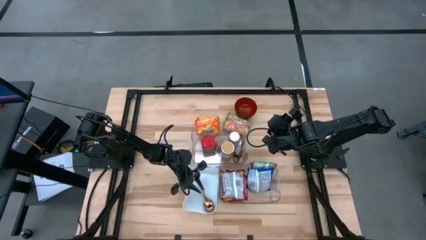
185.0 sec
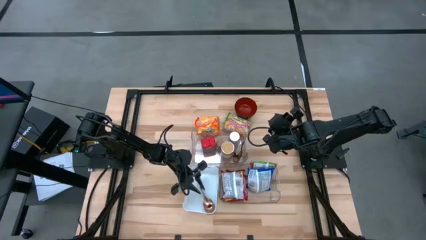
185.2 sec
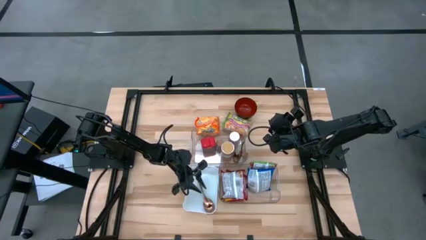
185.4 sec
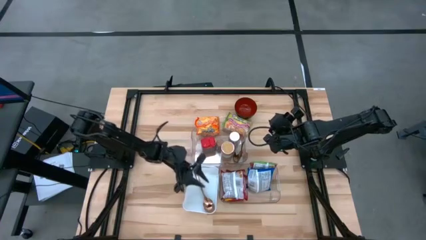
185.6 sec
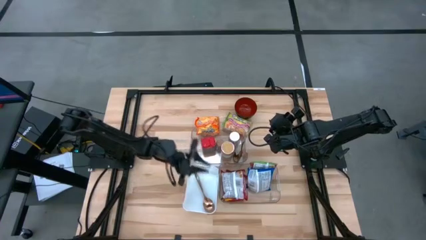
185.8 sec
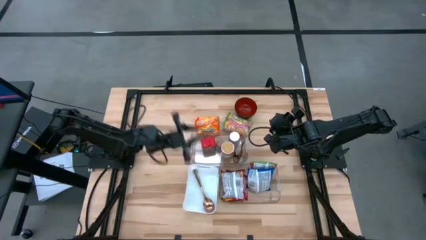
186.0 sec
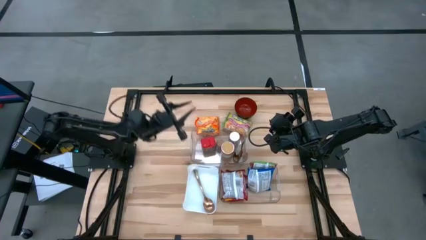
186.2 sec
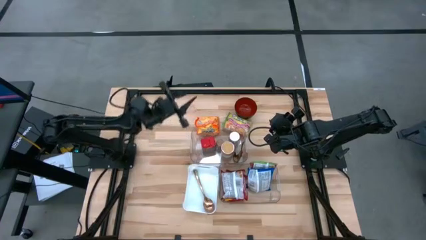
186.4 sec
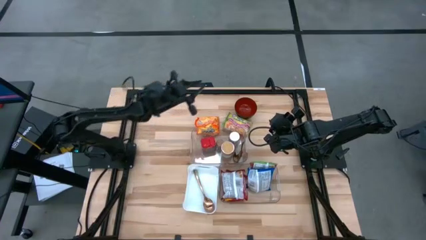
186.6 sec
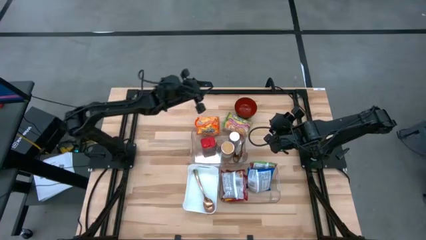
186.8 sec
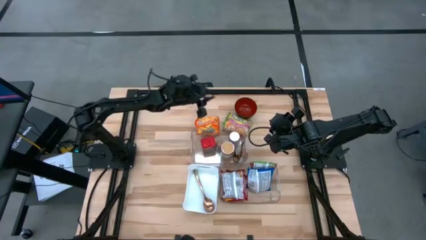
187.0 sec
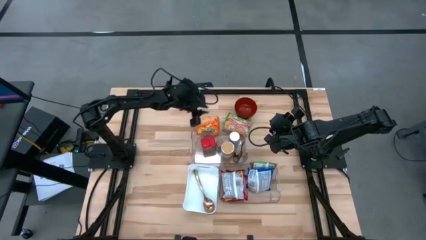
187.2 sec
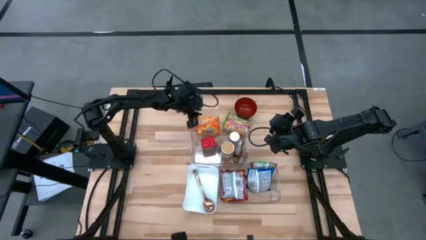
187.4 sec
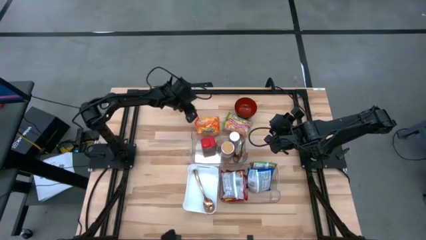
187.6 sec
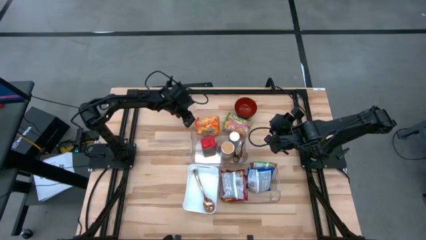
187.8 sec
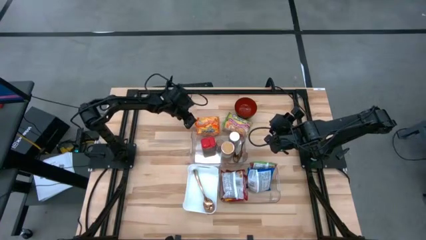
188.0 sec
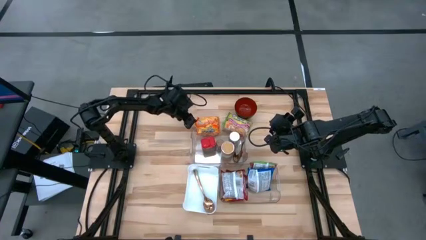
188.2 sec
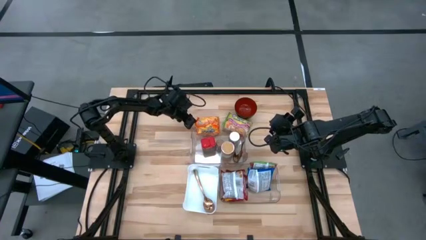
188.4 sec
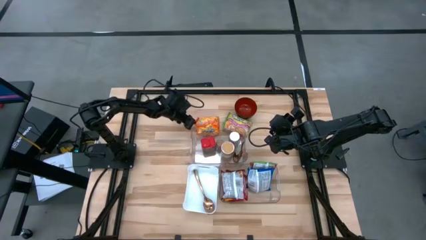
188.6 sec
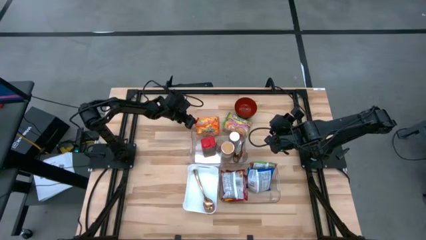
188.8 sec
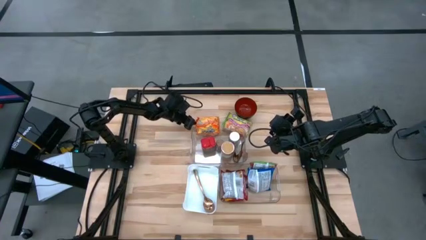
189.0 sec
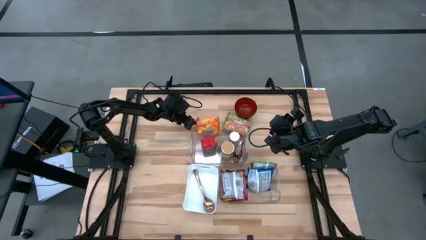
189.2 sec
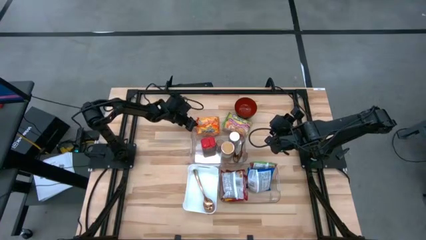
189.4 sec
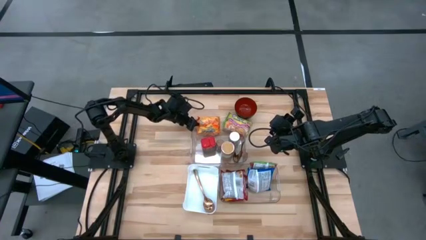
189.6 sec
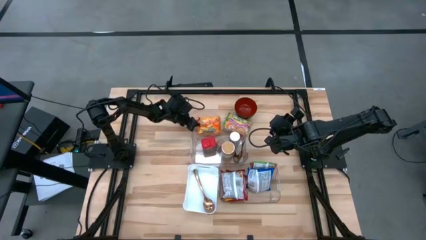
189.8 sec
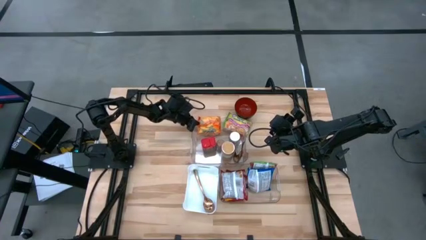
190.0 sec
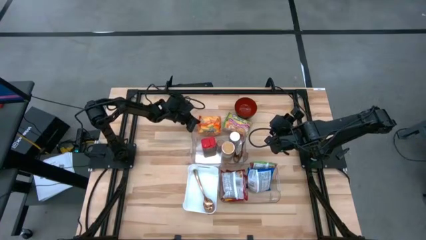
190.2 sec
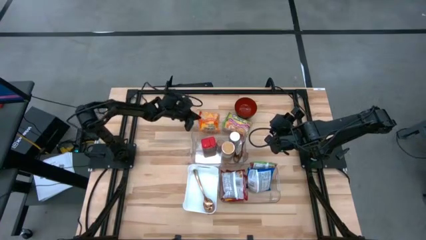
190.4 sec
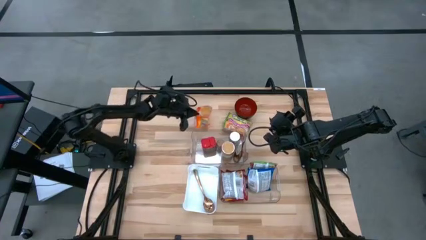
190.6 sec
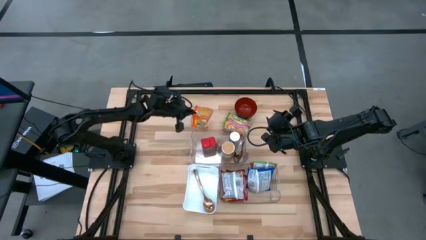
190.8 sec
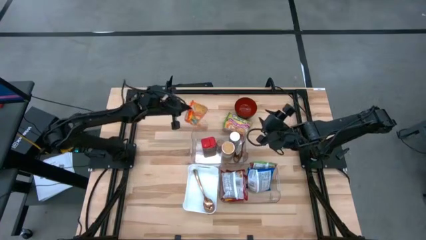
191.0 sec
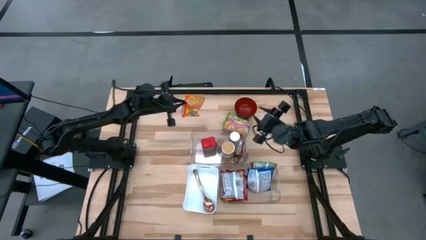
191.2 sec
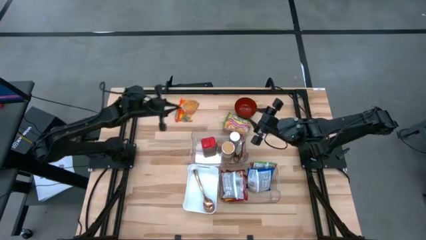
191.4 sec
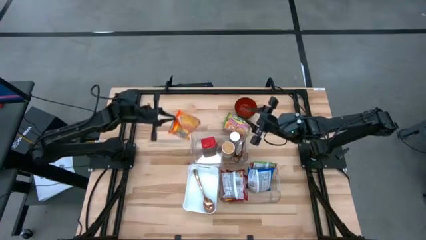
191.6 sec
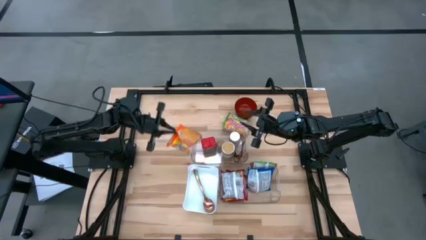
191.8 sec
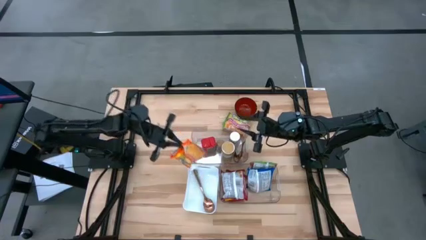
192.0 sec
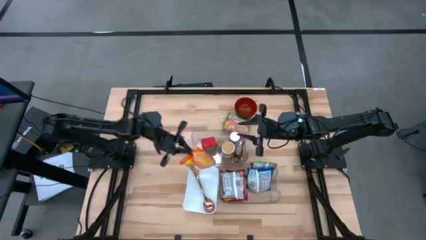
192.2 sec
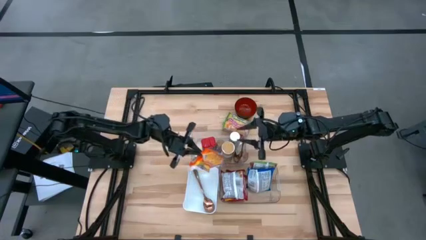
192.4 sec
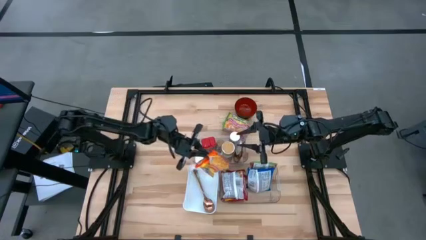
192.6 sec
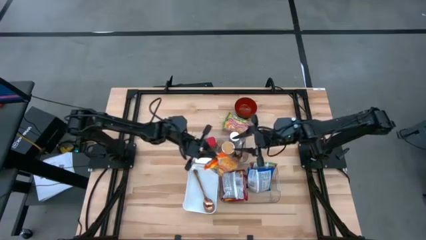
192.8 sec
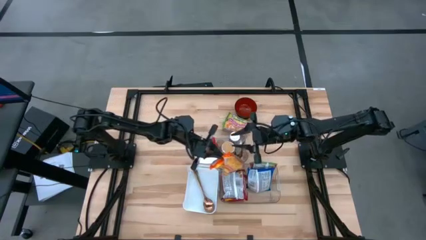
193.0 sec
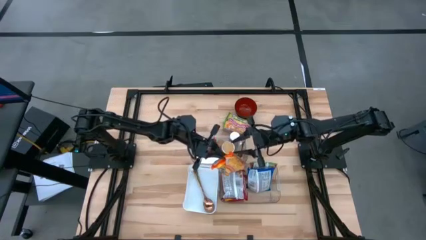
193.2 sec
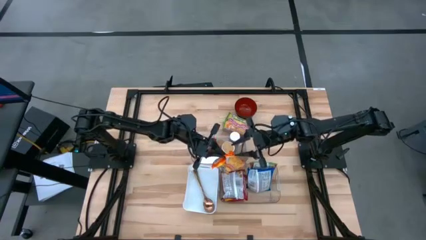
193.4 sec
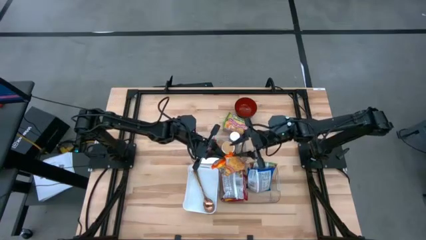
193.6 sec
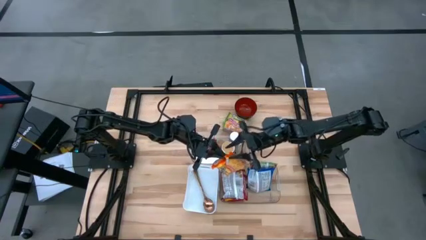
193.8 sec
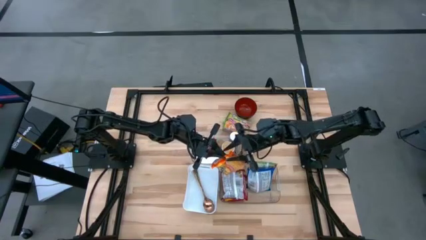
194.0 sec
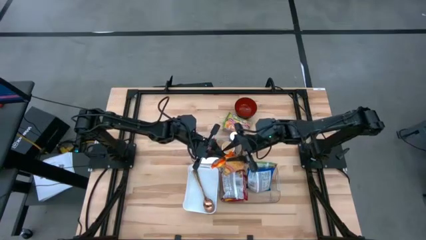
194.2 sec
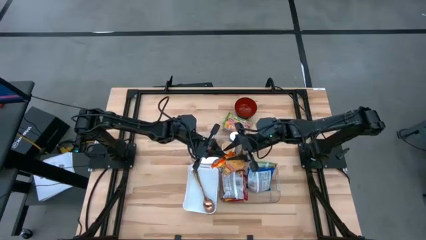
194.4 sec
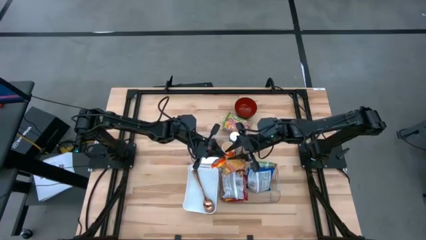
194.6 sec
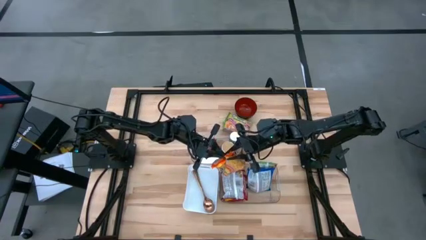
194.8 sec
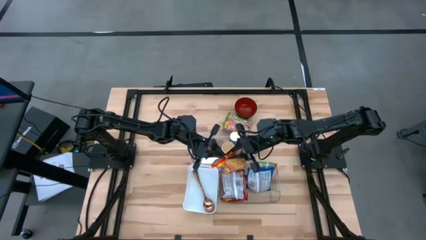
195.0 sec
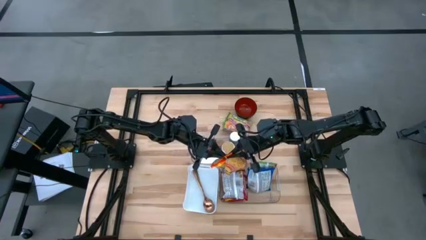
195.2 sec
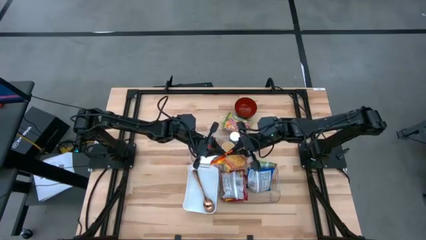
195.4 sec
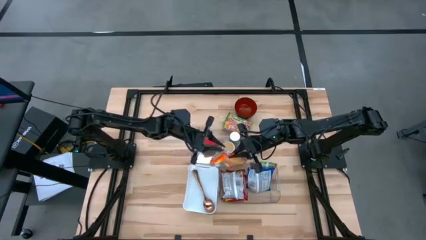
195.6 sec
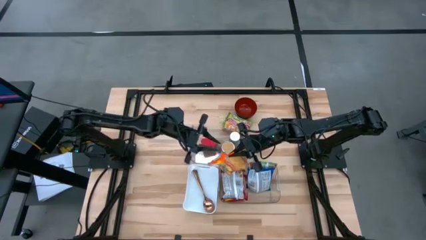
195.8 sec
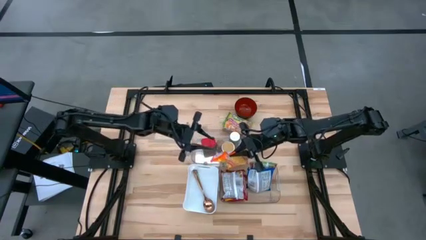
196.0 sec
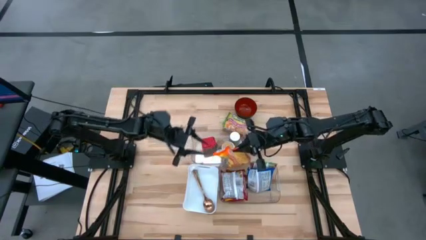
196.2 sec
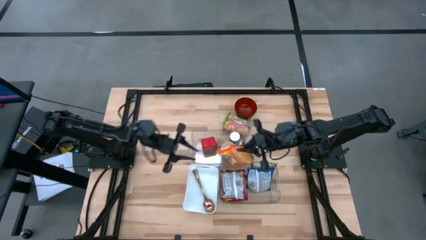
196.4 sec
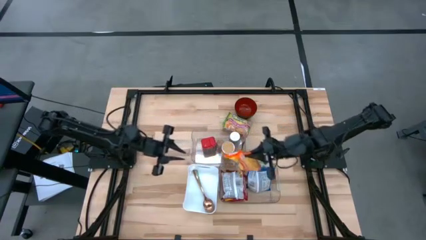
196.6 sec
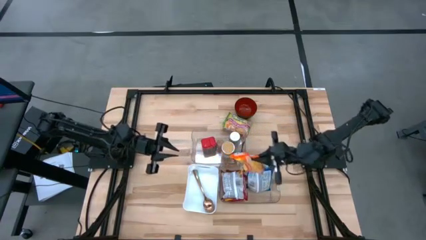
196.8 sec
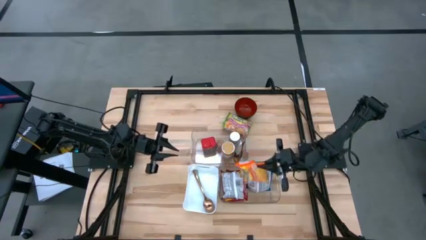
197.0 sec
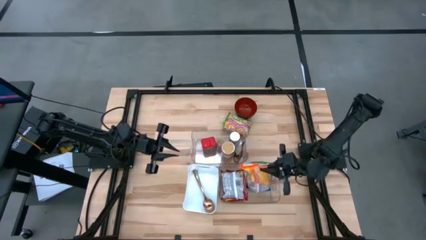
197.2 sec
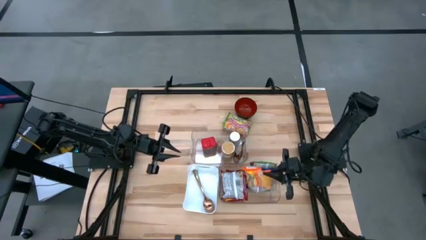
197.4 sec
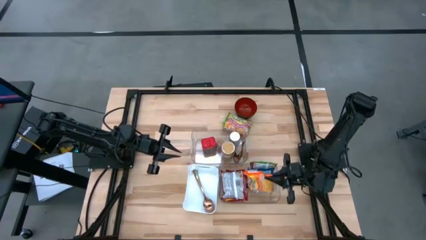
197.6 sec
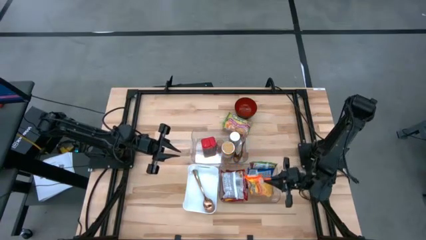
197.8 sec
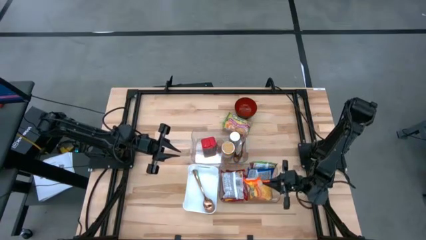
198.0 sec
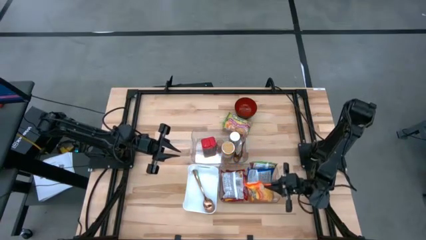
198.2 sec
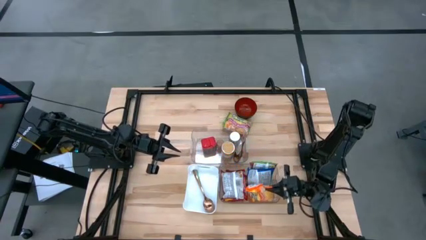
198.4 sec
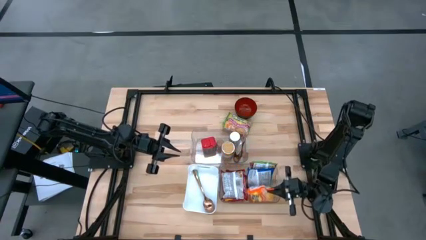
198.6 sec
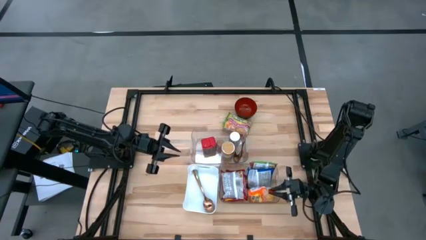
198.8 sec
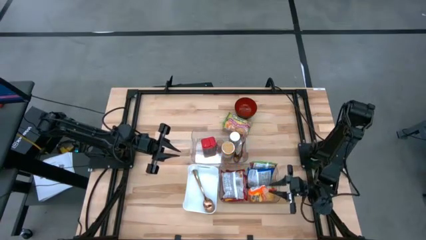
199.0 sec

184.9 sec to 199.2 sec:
Task: Pick & Place Food Item
Put the orange noodle pack into the bottom transparent bin
